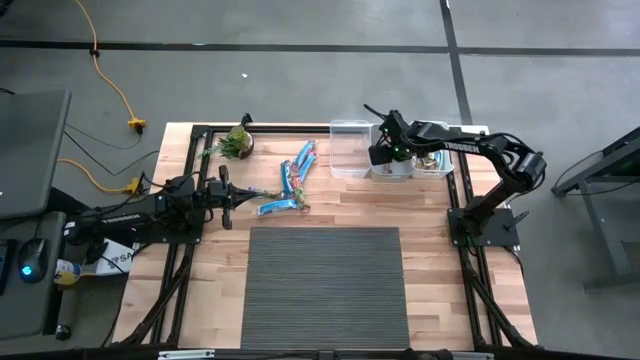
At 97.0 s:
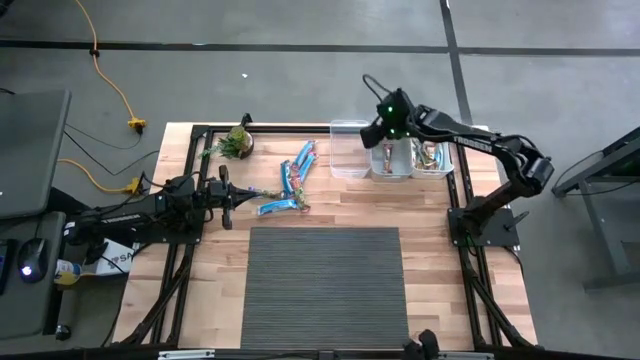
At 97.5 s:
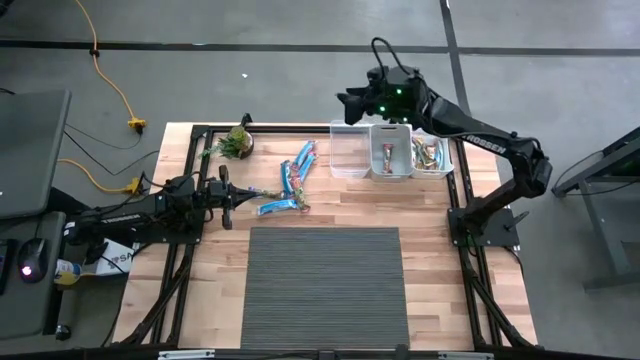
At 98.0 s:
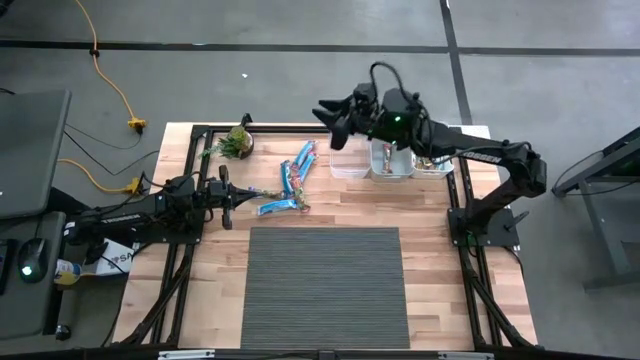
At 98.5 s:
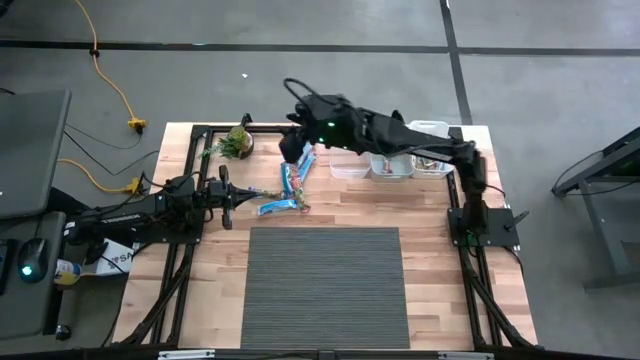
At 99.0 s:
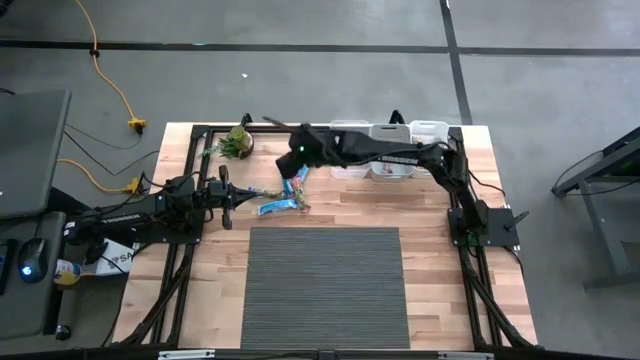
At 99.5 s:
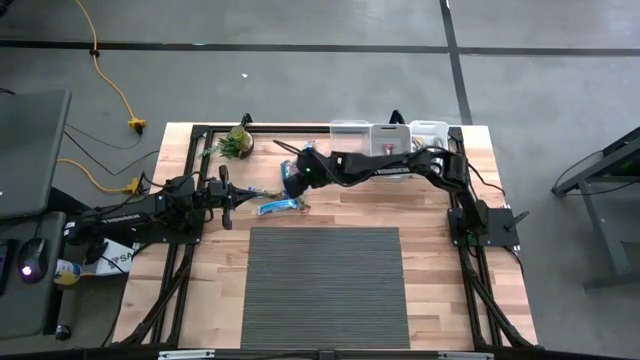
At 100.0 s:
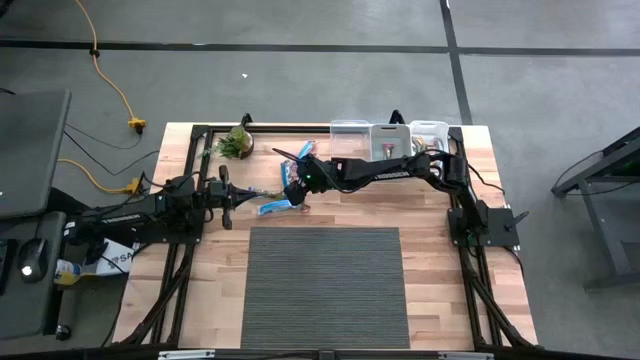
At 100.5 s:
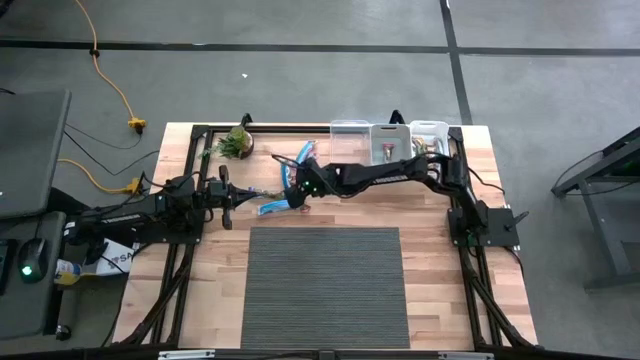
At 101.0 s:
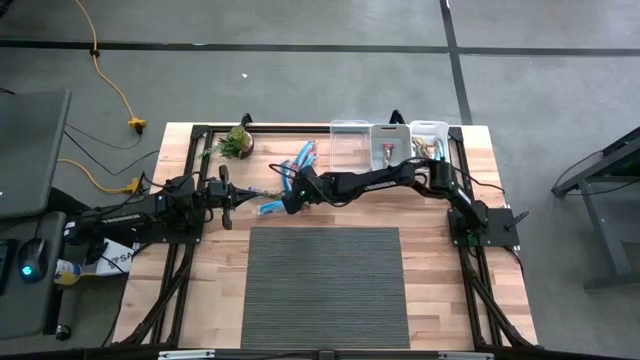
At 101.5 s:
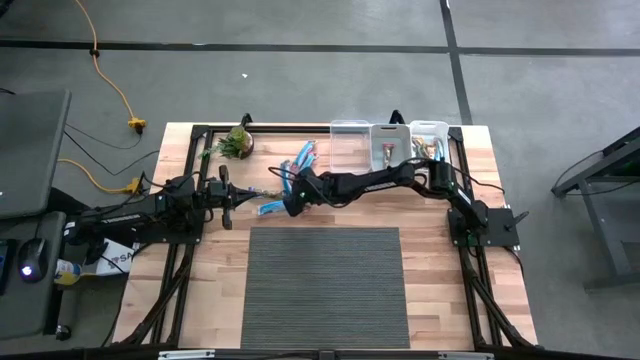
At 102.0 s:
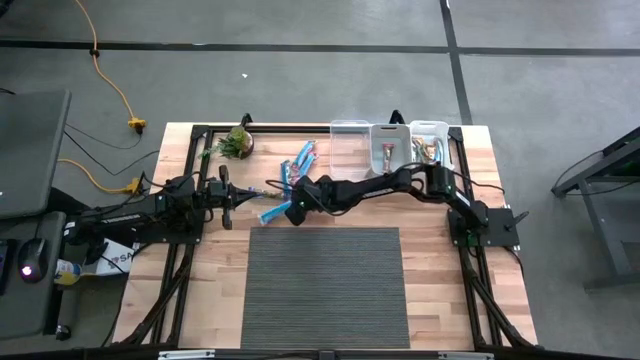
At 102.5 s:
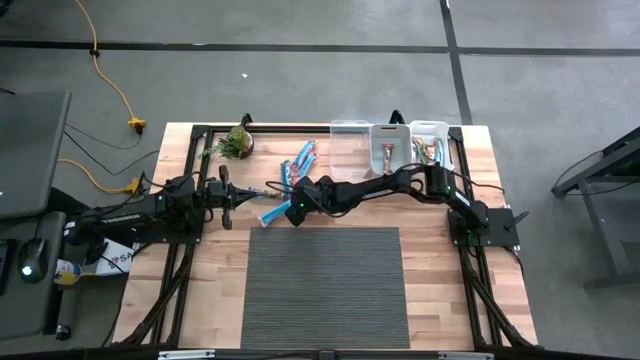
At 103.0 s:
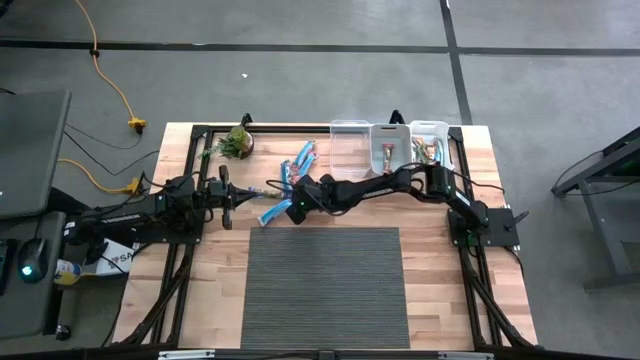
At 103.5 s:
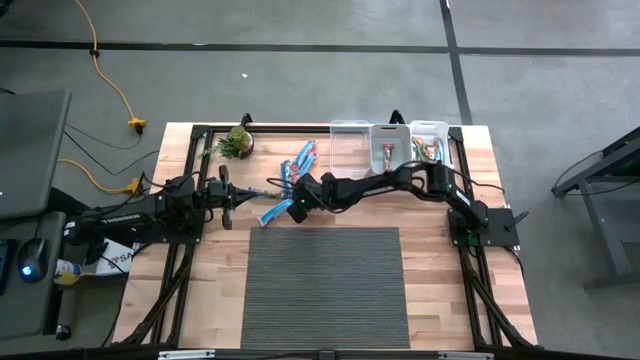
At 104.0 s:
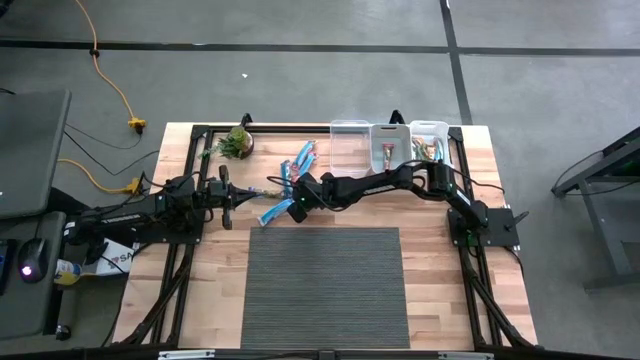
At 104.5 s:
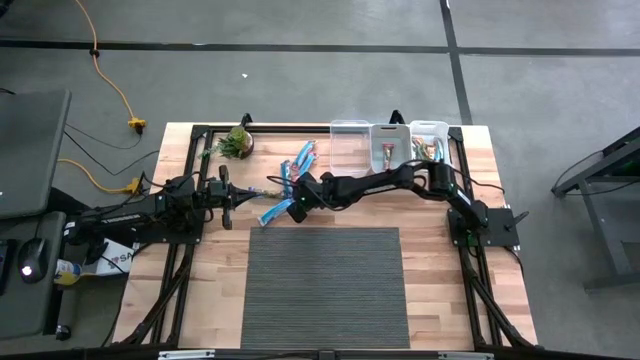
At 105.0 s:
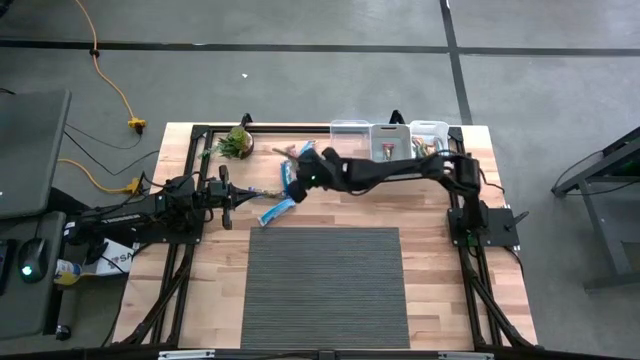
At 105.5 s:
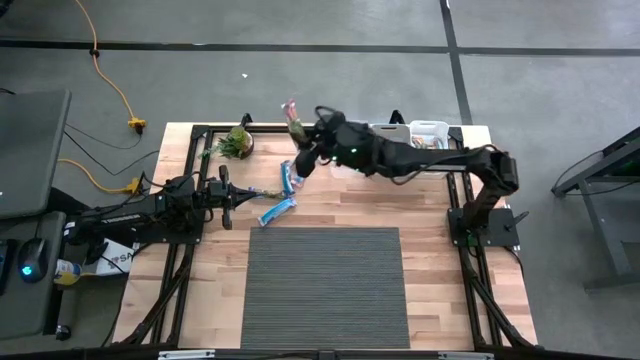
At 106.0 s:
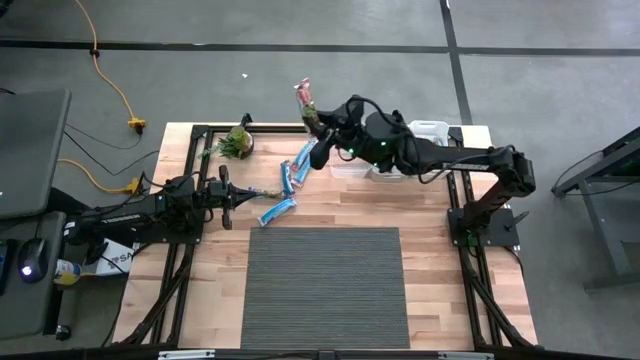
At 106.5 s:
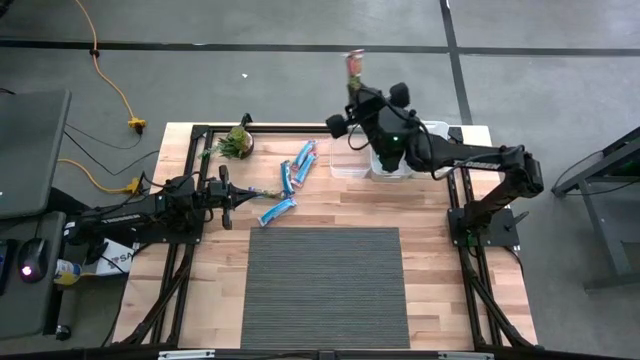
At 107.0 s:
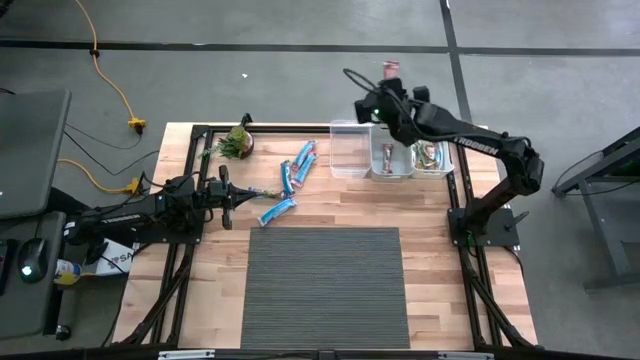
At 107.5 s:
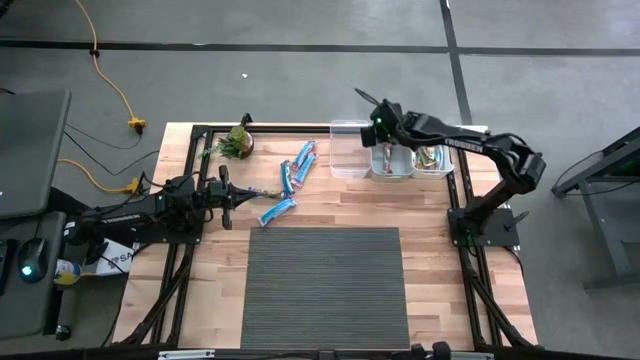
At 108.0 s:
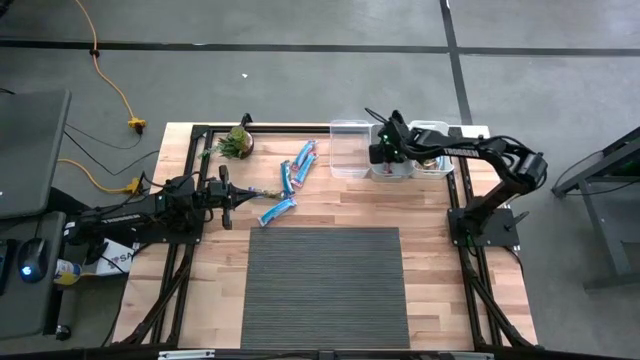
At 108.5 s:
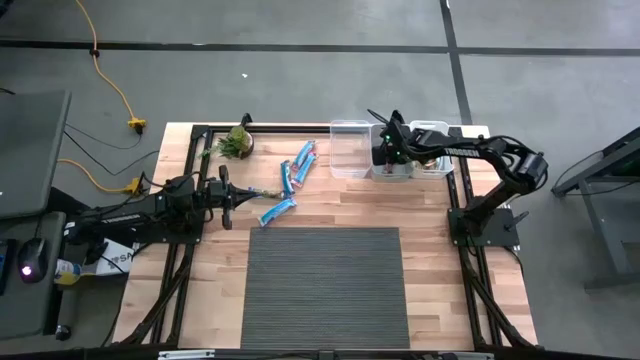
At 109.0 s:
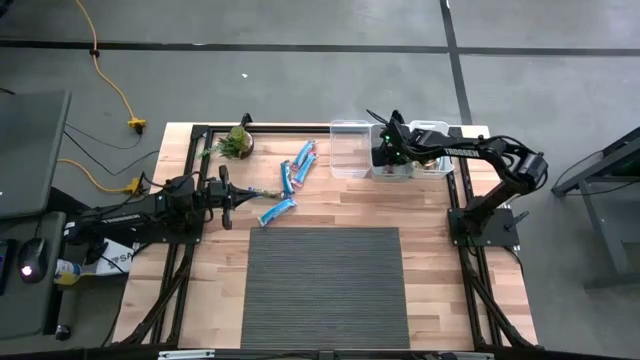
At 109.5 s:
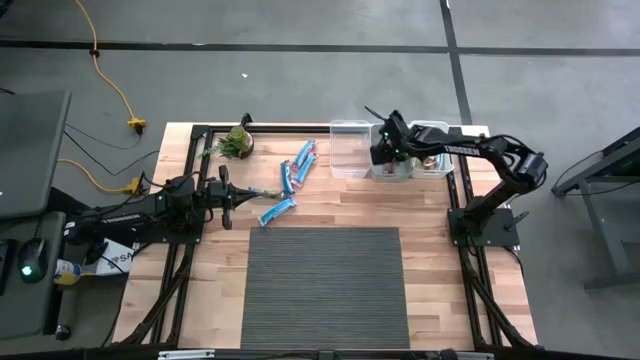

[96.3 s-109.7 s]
Task: Pick and place Granola Bars by type
Put the red granola bar into the gray bin

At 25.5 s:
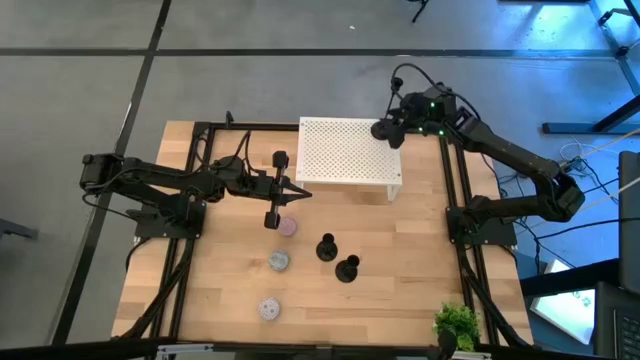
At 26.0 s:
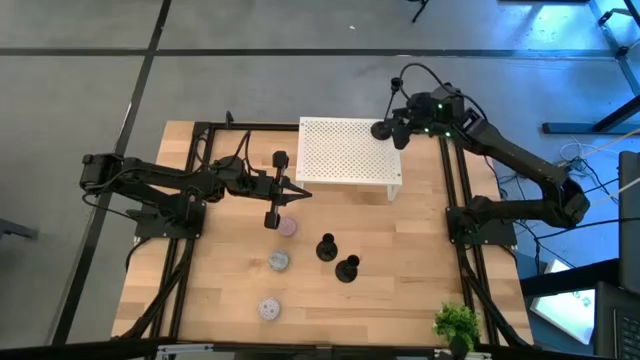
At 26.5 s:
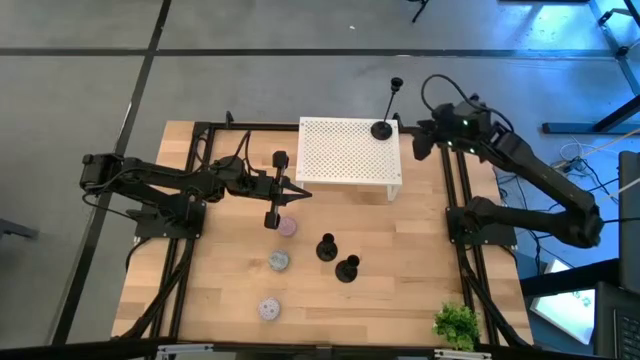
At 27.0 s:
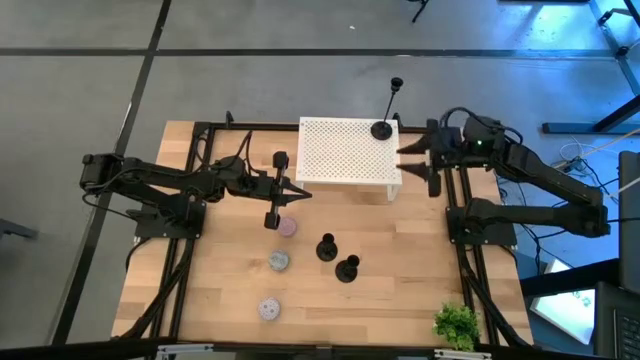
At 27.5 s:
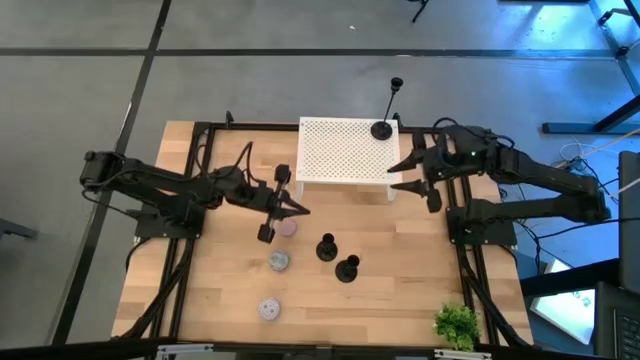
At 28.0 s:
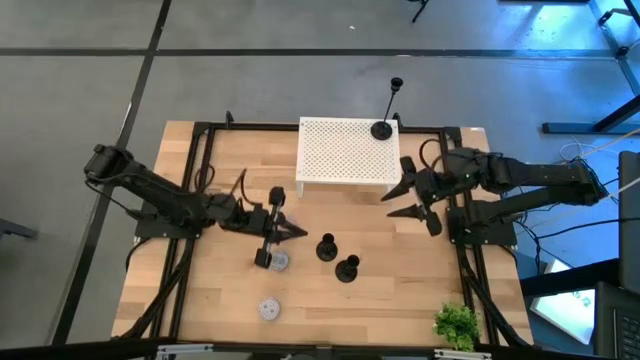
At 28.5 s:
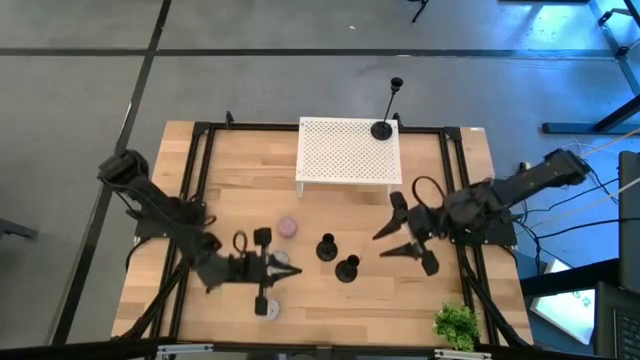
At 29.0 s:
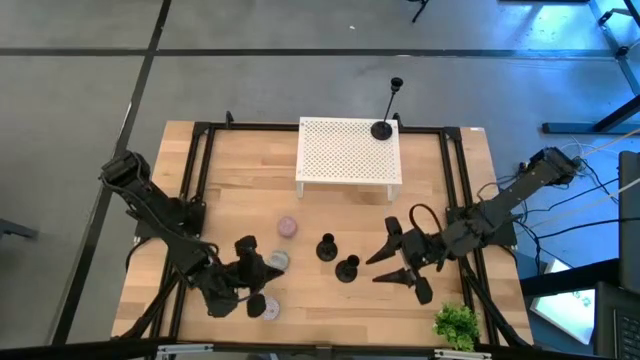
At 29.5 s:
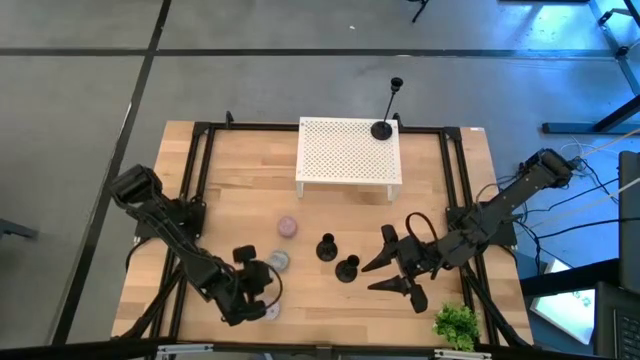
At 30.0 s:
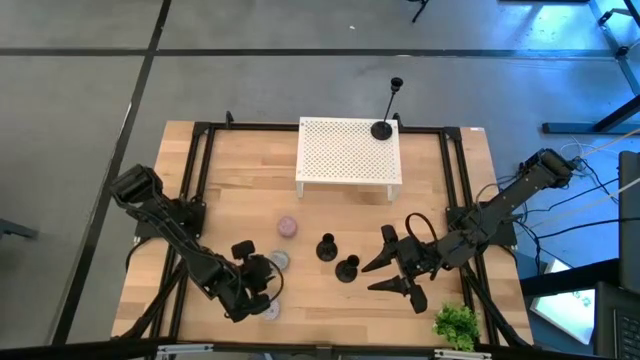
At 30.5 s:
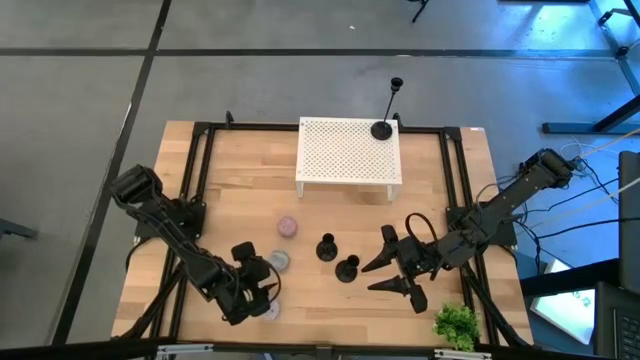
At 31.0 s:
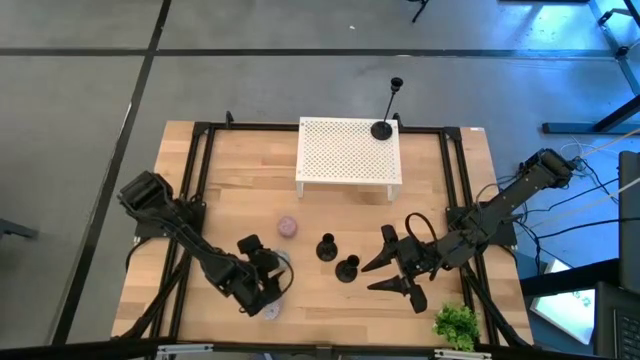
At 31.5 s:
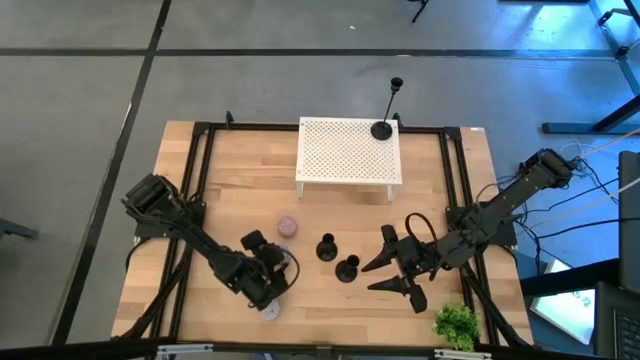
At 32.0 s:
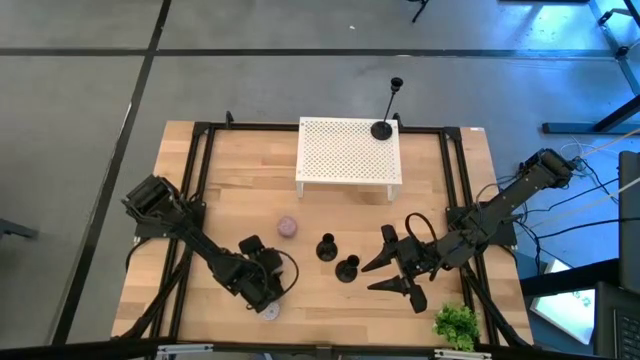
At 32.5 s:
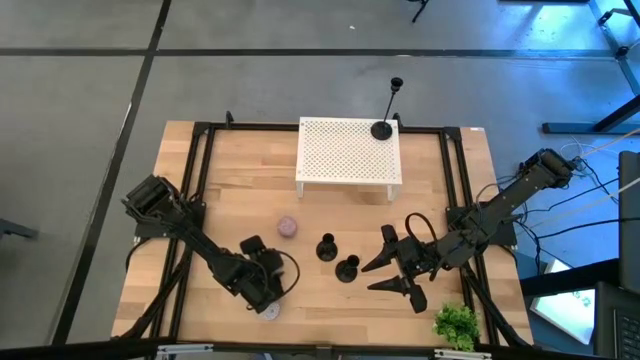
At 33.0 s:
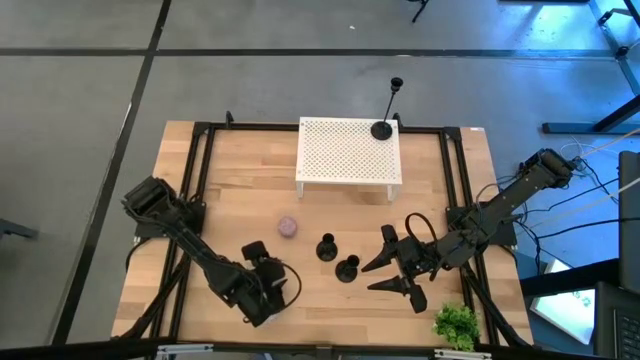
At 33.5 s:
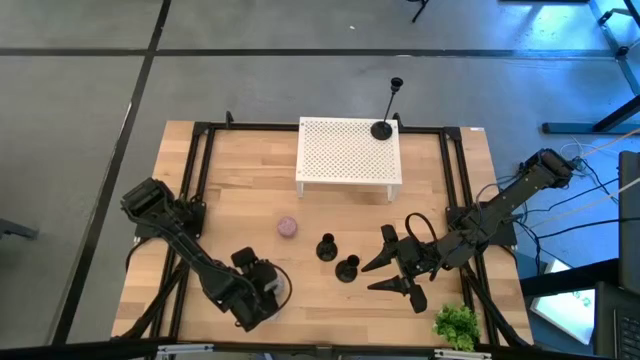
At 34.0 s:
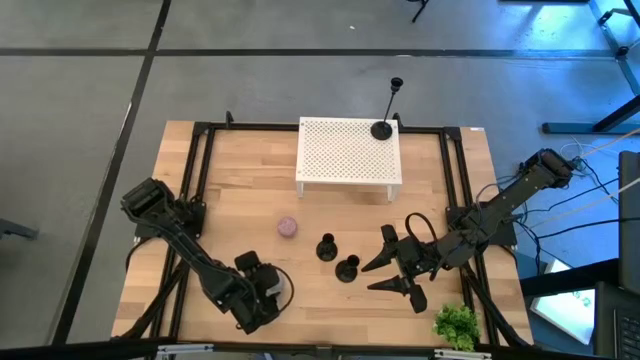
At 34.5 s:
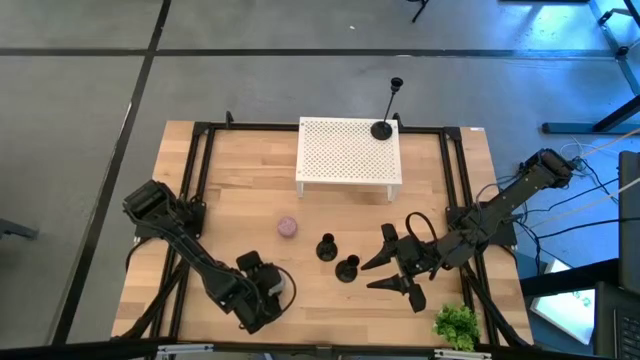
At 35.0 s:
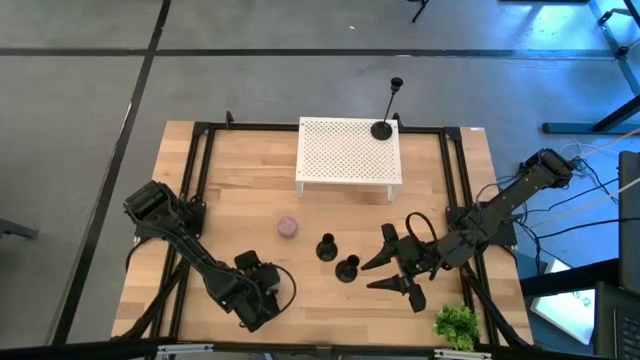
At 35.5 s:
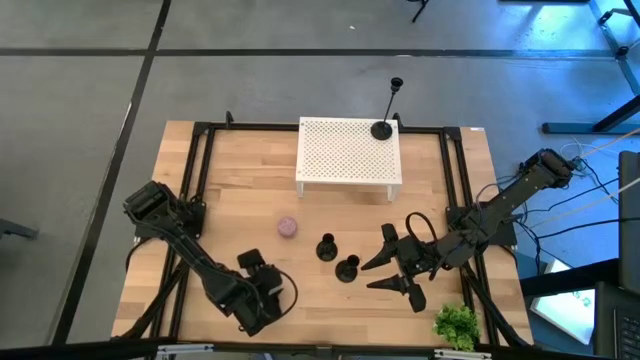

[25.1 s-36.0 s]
Task: Pick & Place candle stick holders
Put the blue scented candle on the shelf
